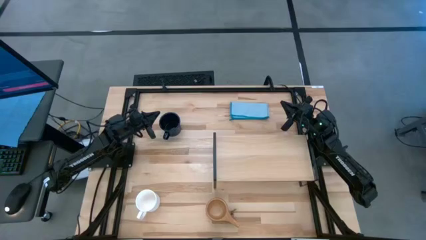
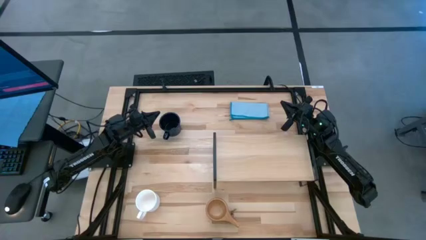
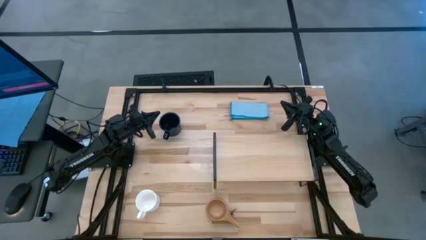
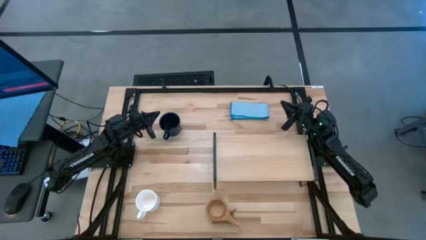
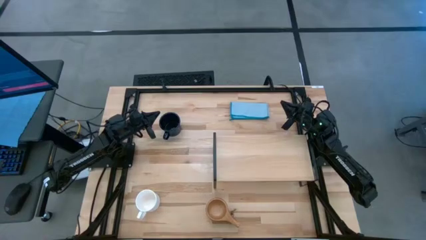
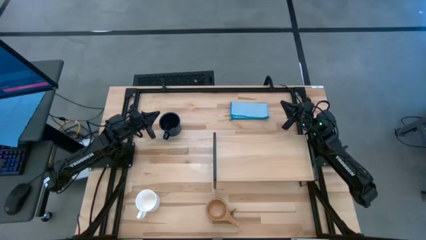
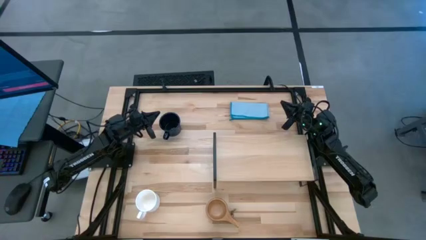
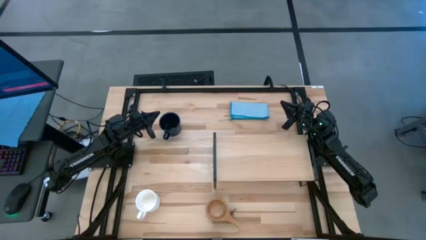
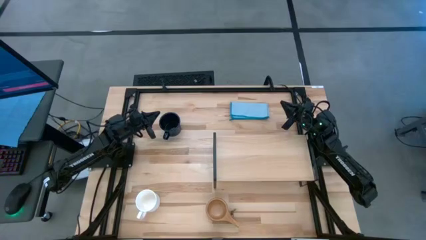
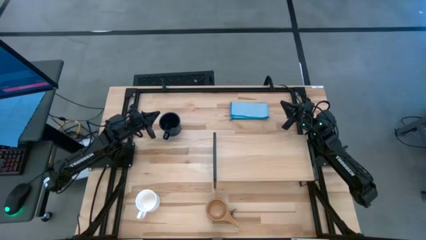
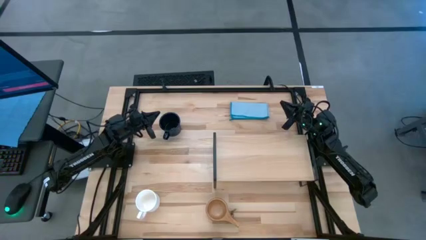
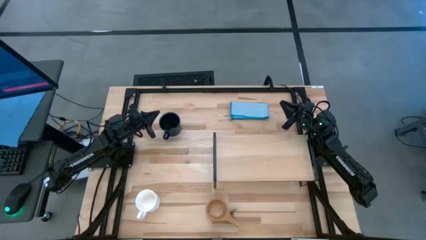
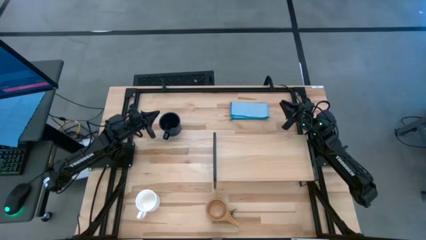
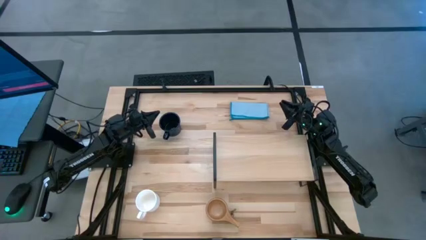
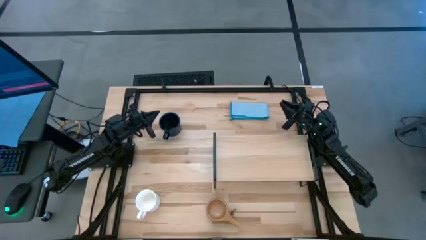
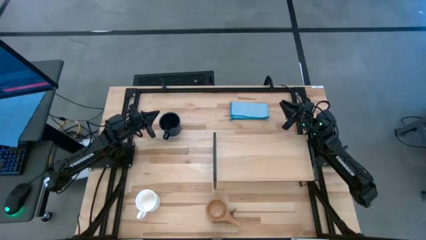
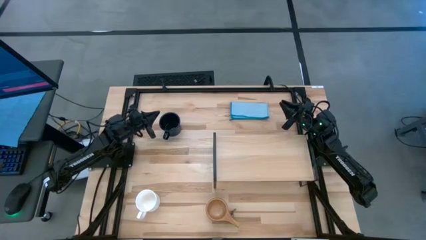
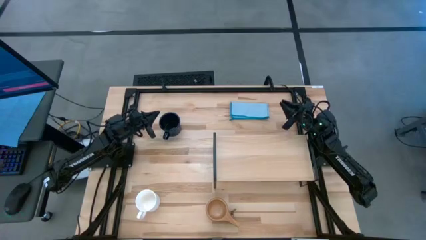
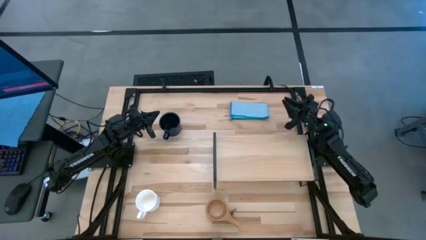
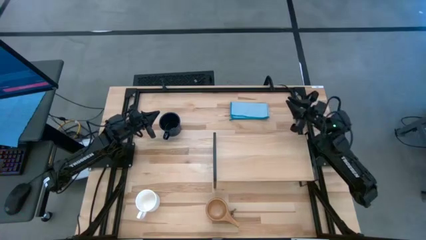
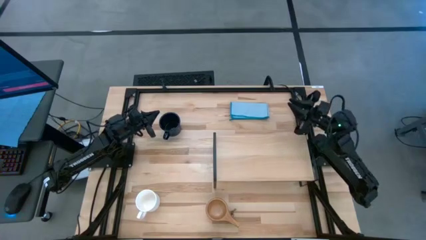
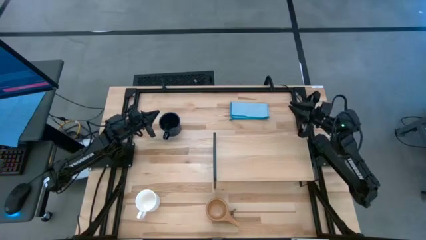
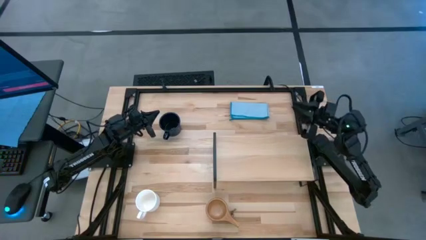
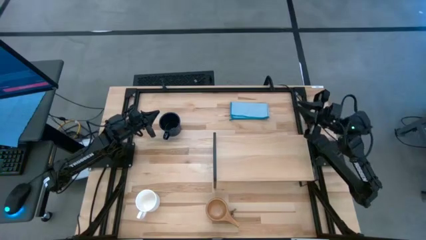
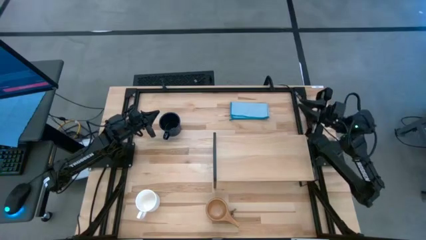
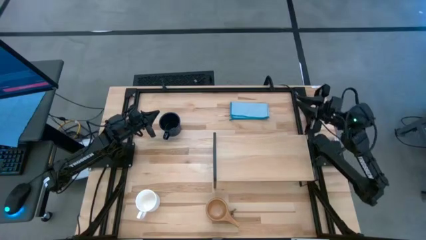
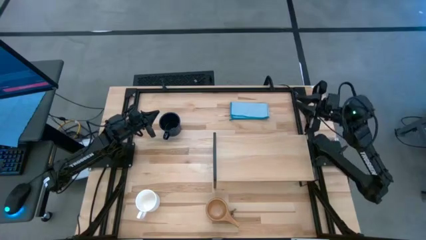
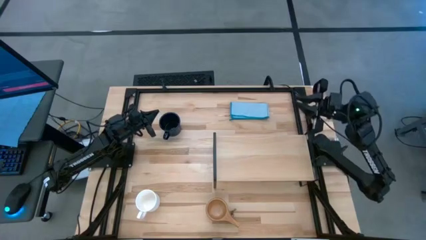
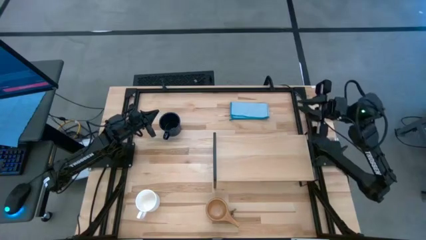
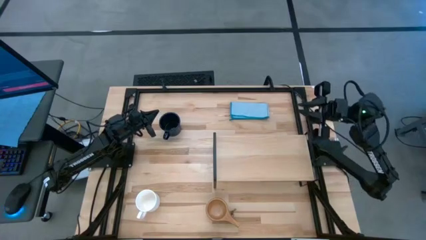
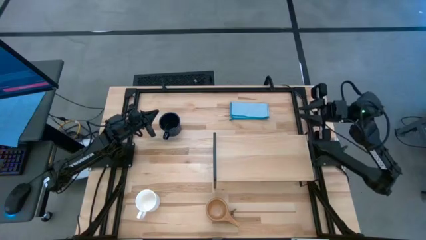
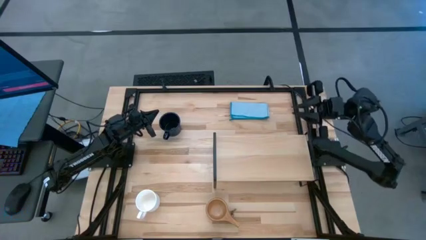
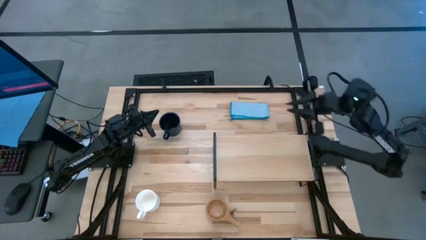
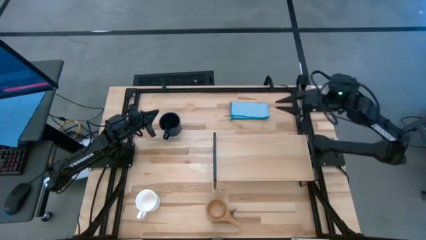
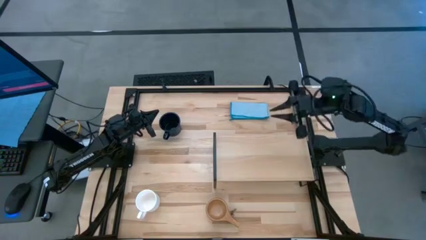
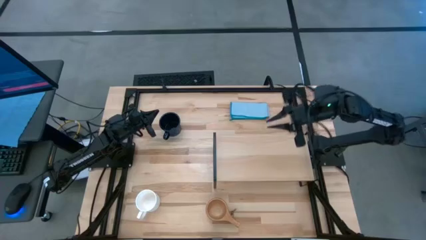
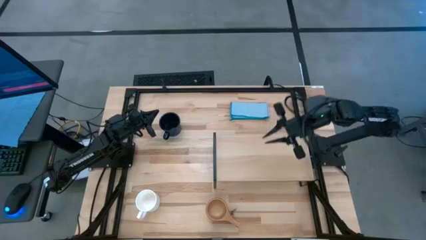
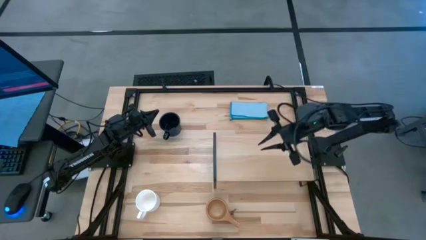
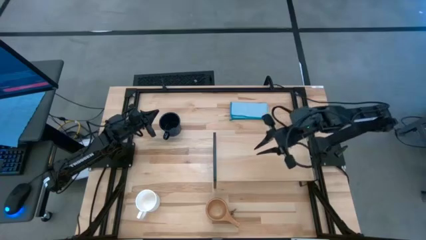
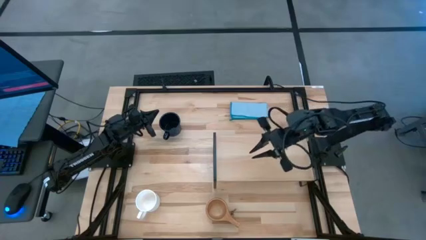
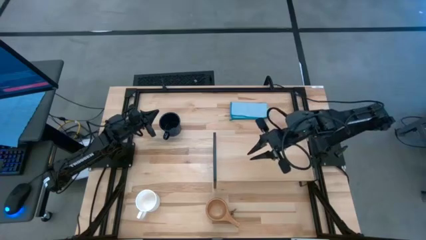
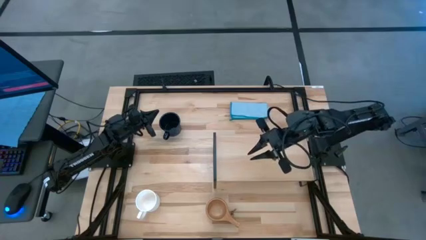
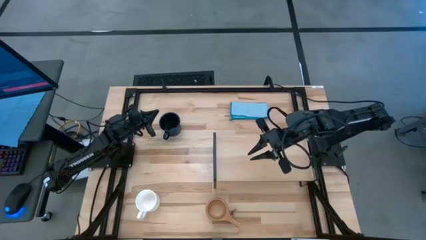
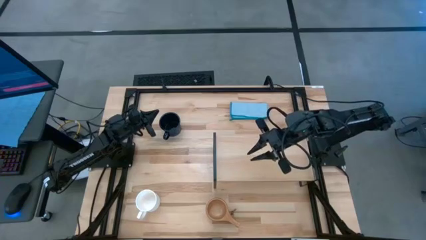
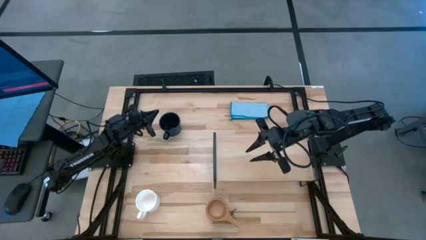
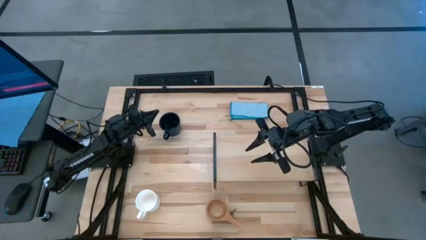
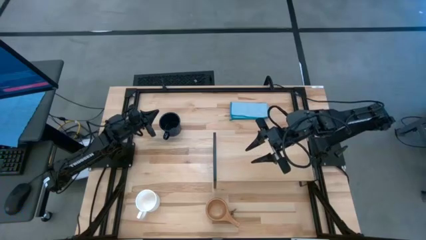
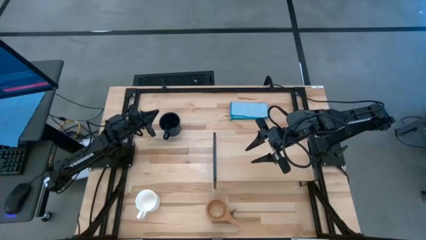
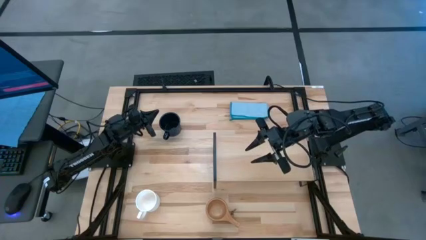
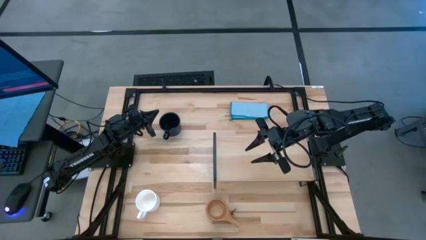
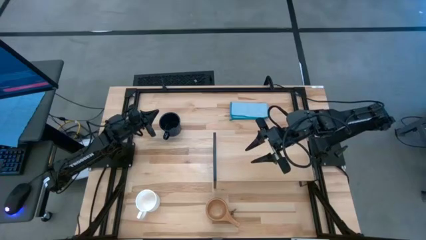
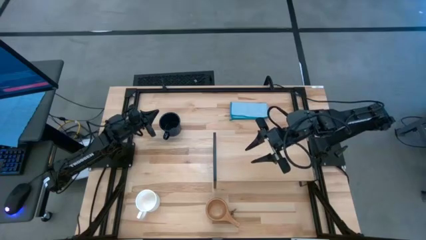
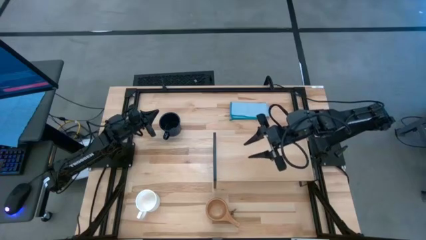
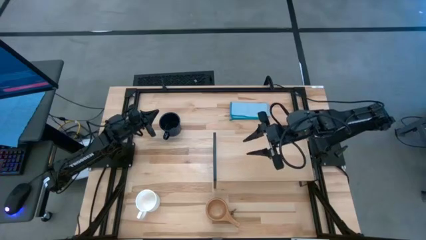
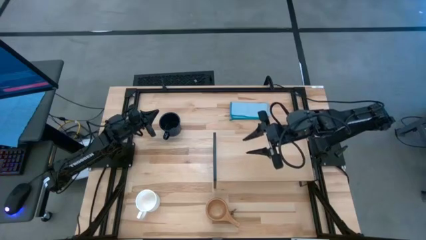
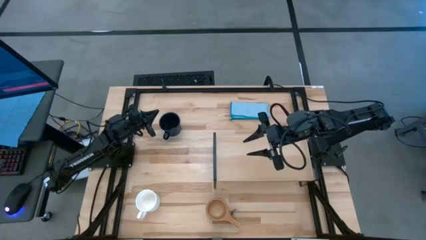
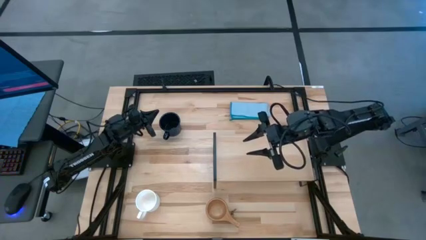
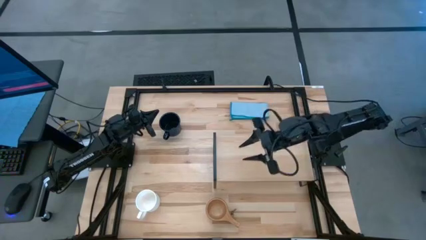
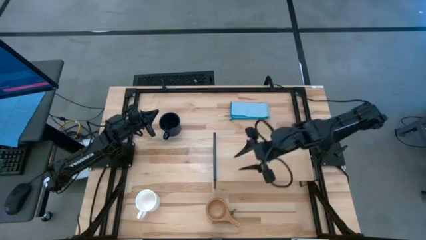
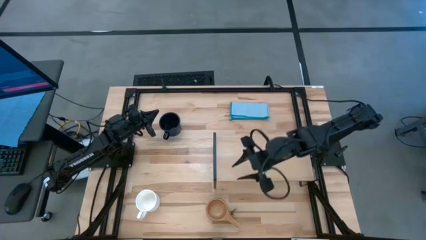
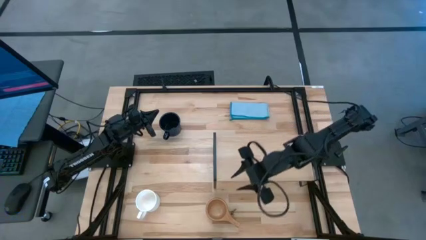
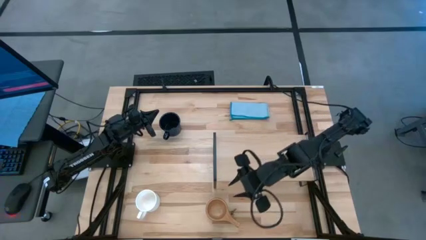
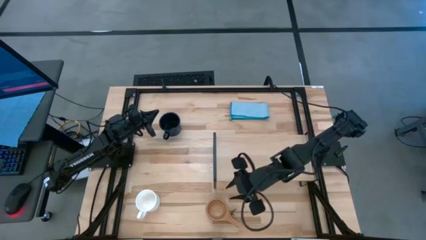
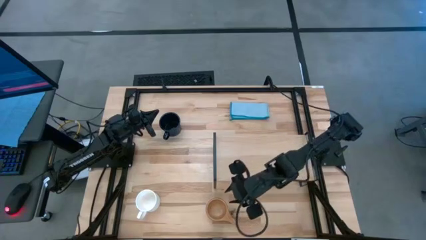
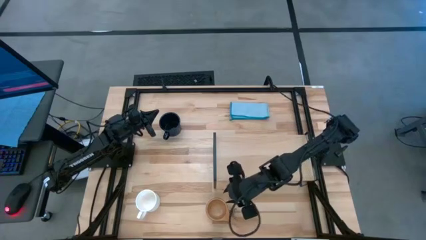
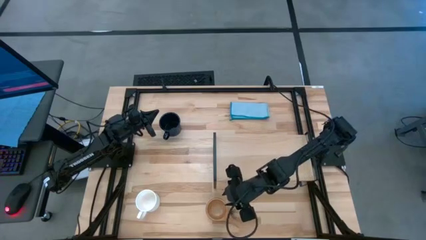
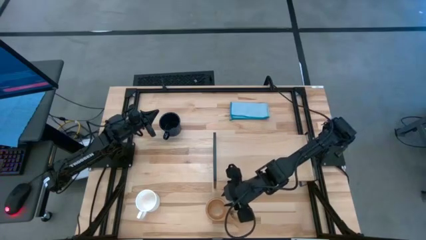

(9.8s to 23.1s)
Task: Stack small to large cups/mugs on shelf
Put the brown mug on the shelf
